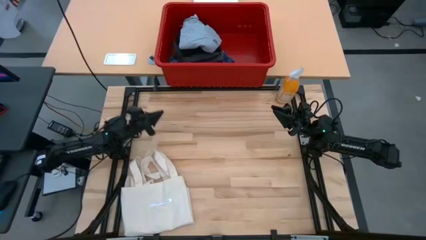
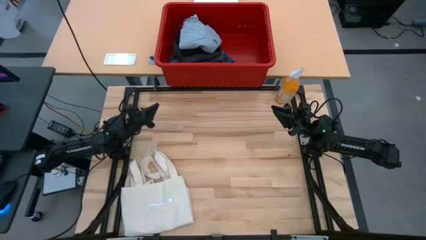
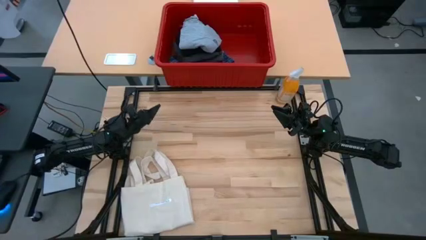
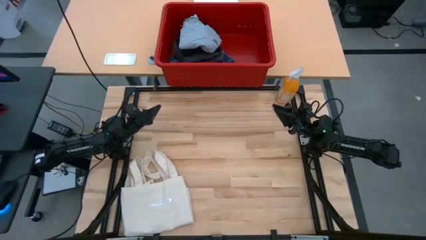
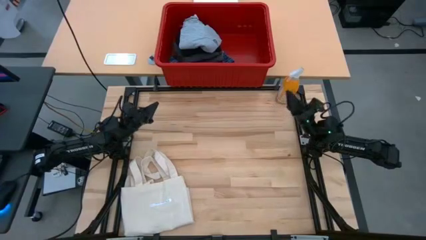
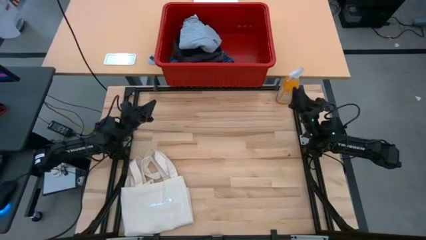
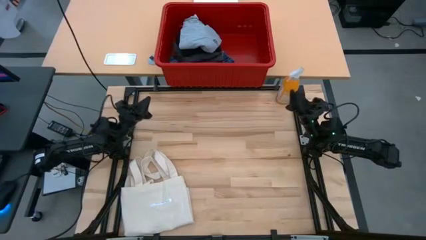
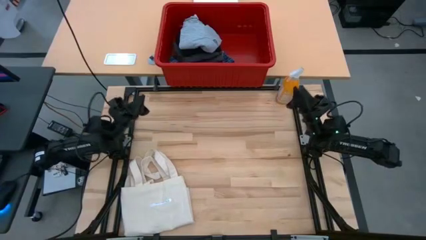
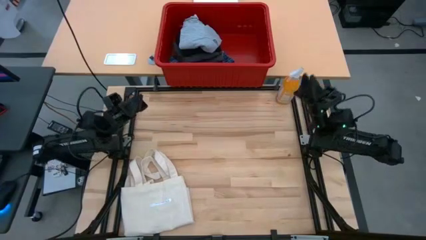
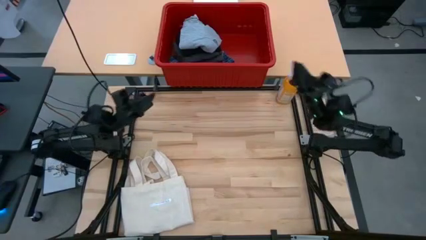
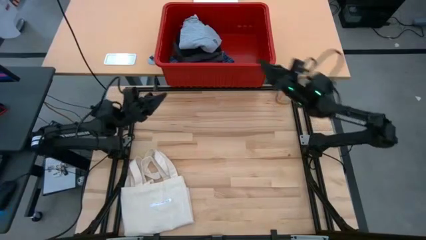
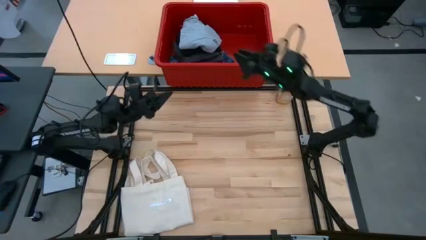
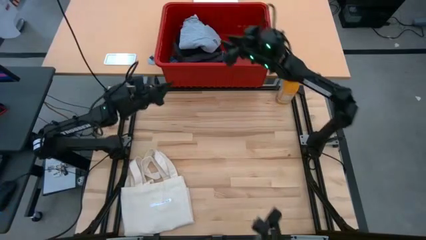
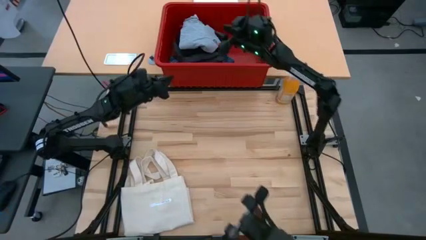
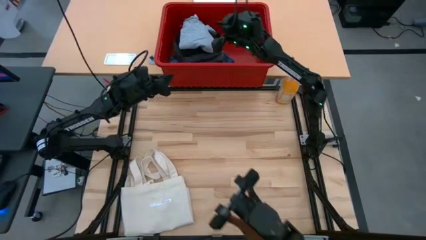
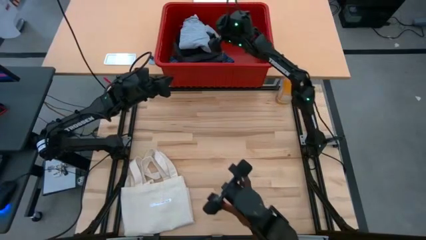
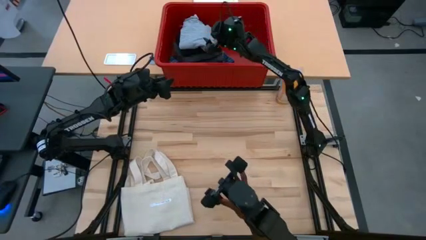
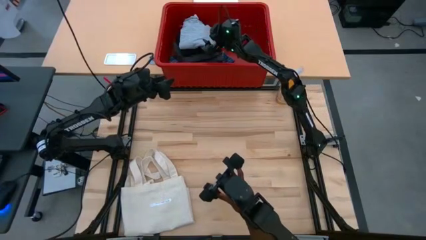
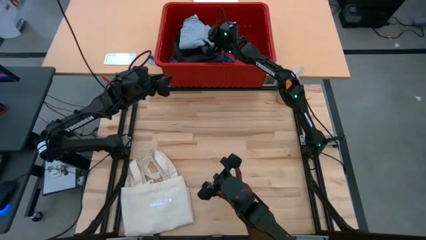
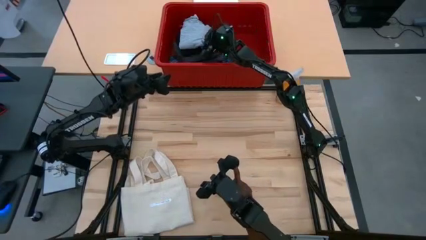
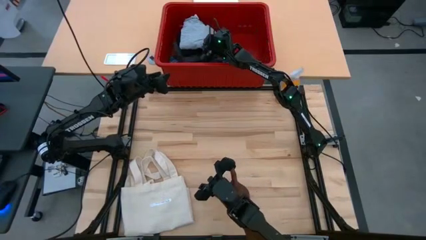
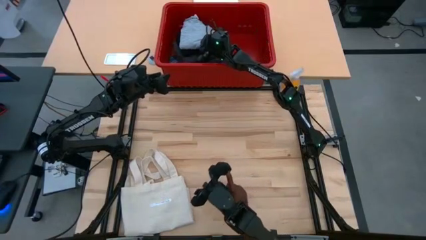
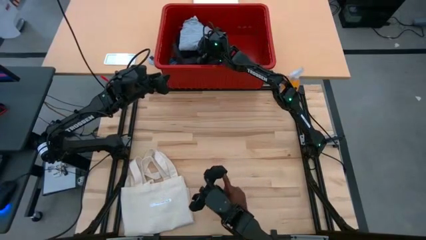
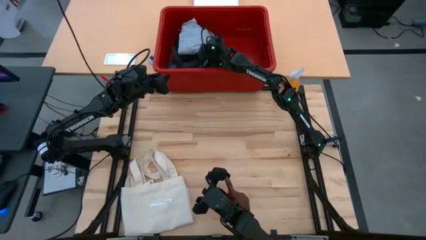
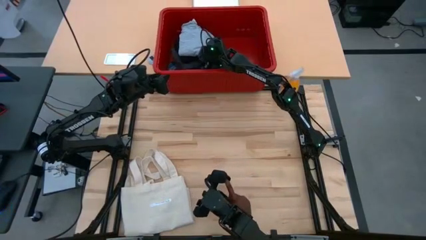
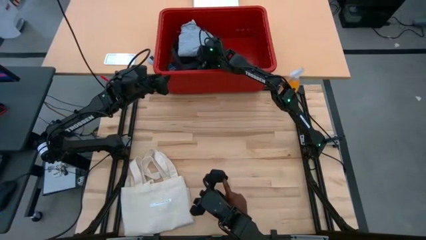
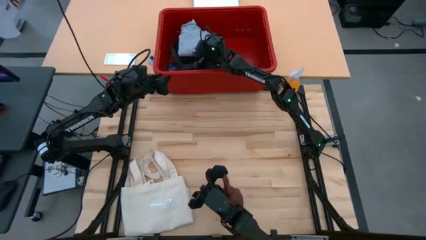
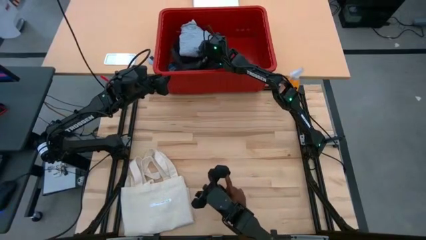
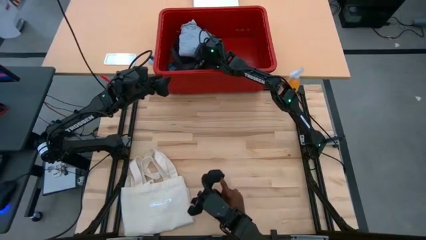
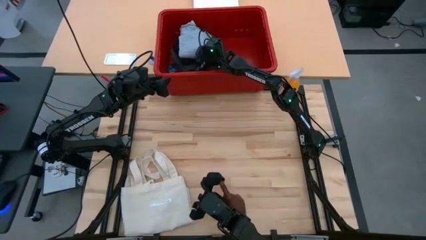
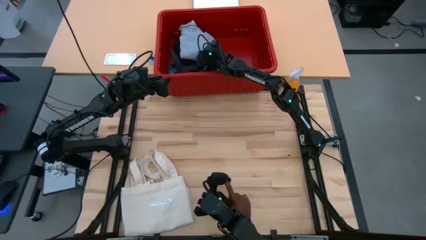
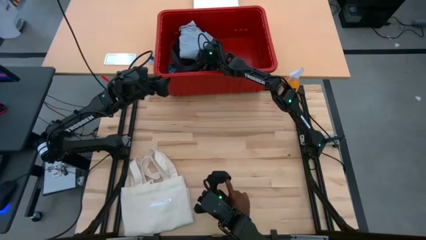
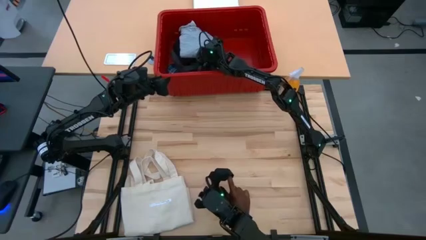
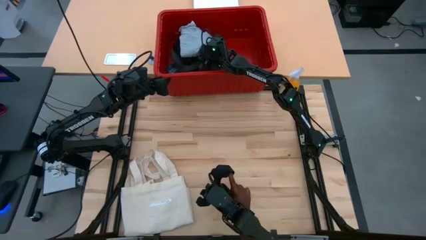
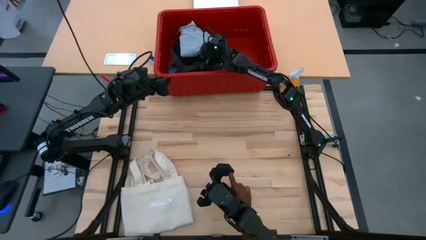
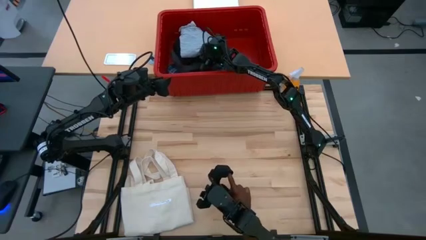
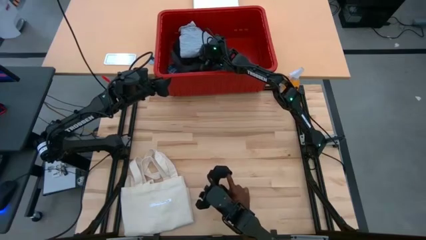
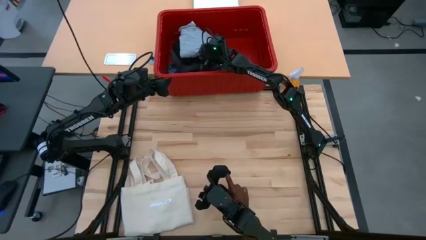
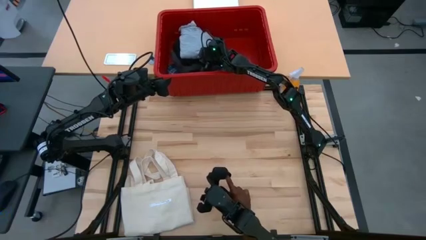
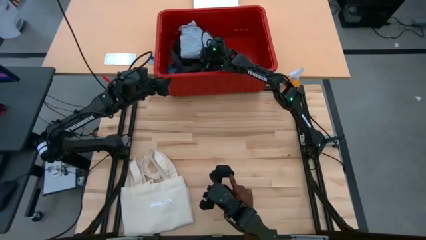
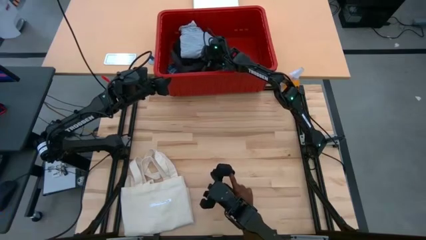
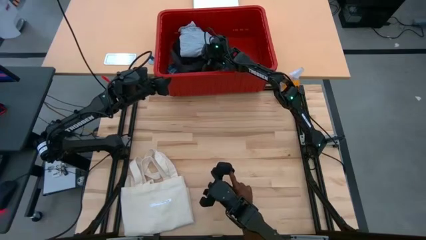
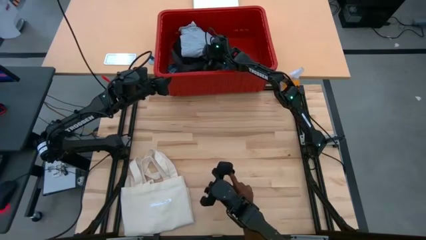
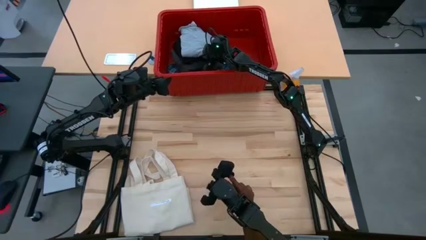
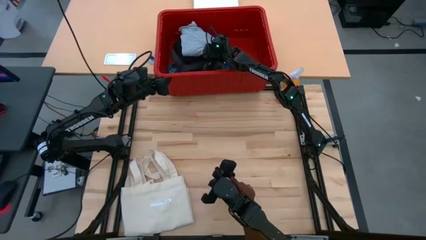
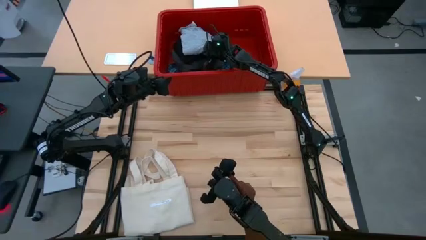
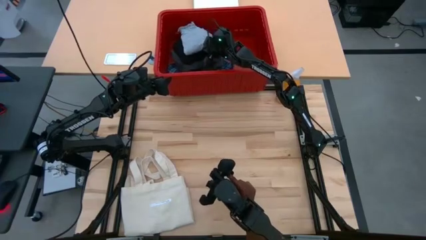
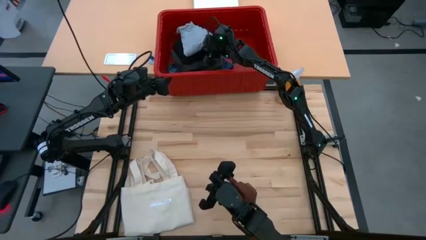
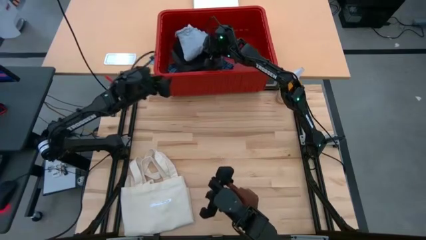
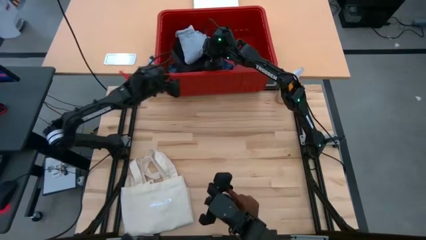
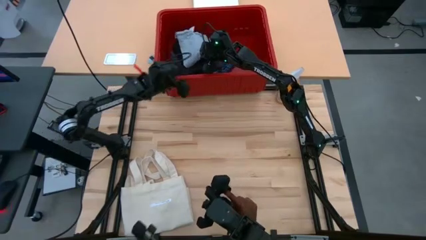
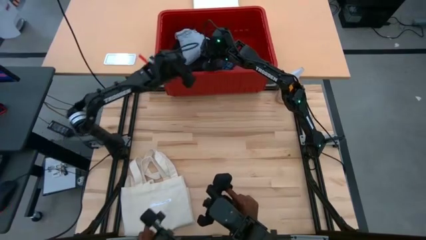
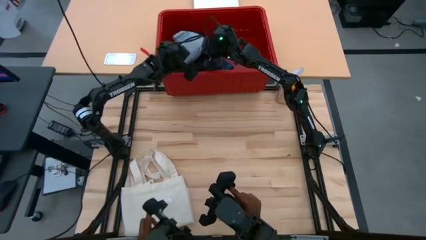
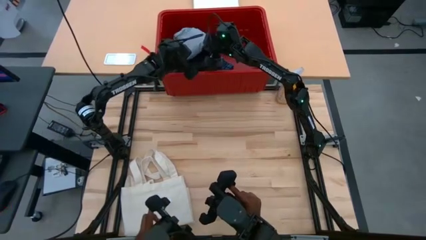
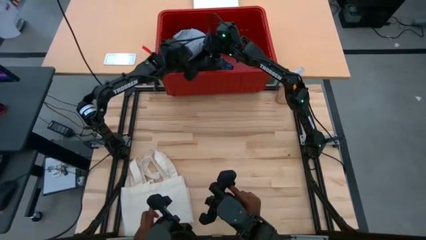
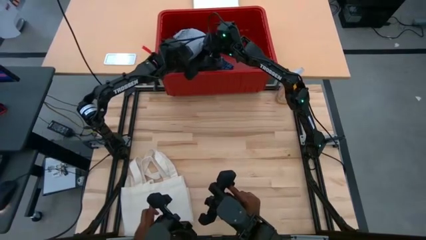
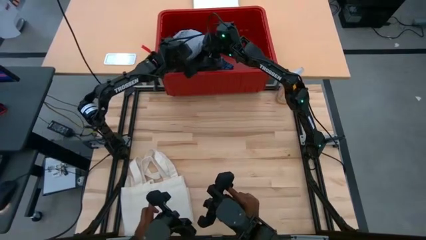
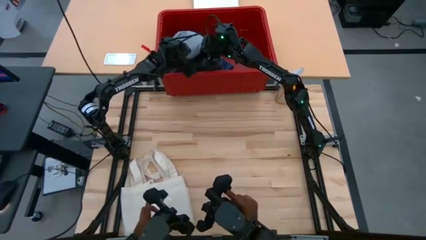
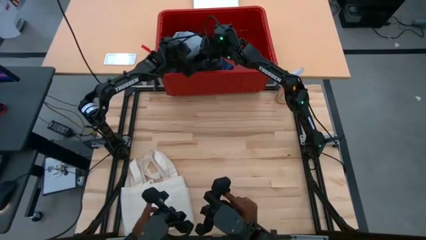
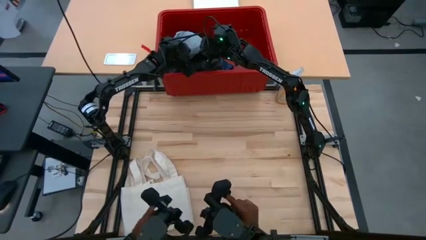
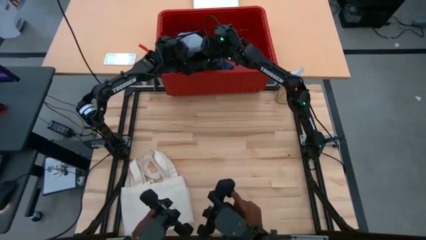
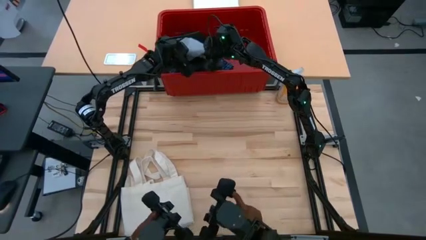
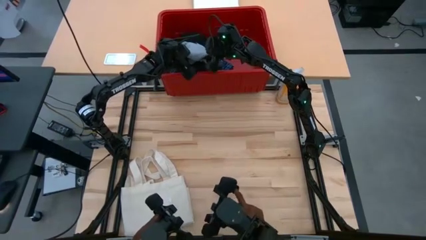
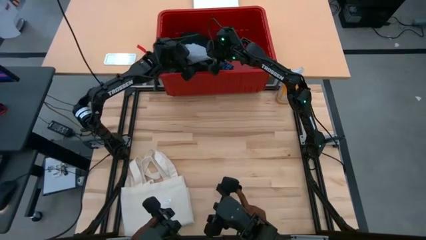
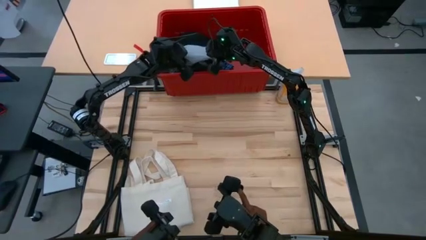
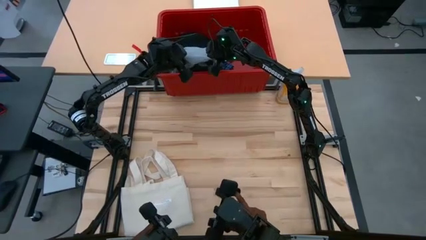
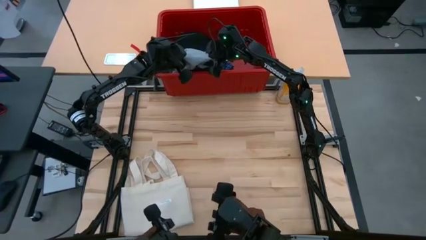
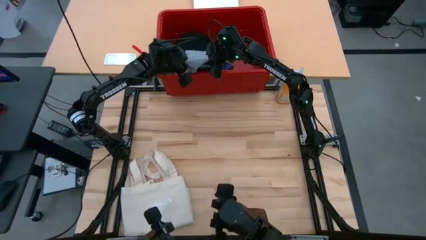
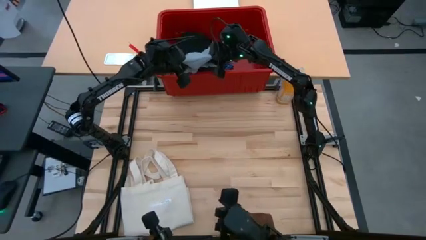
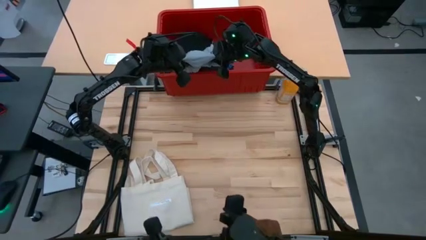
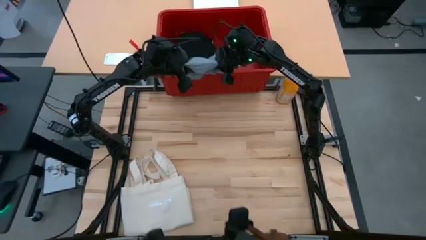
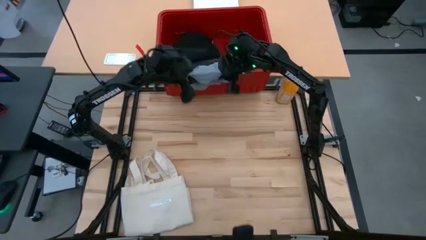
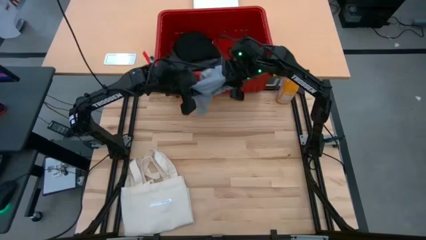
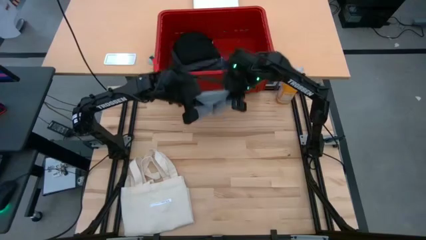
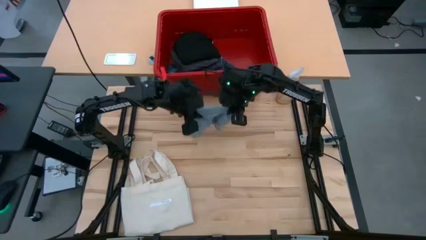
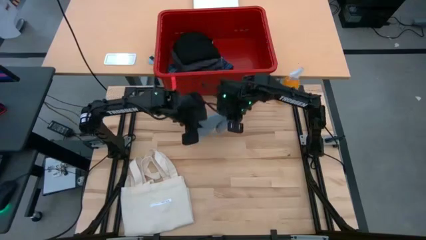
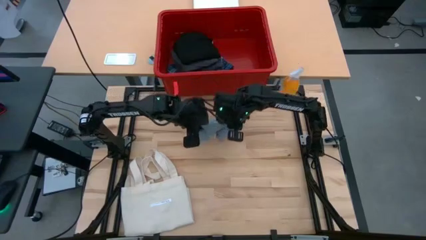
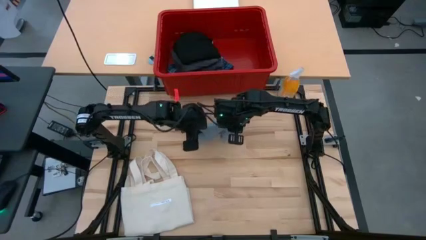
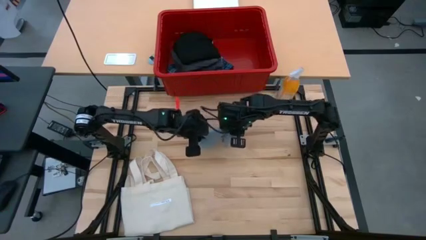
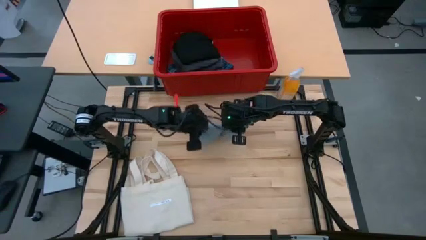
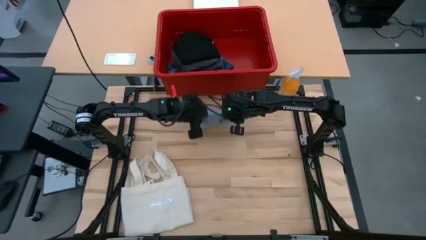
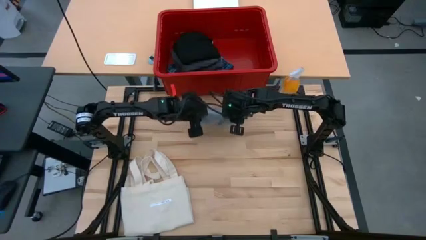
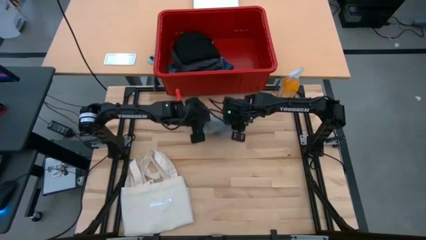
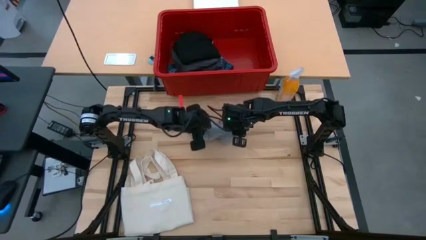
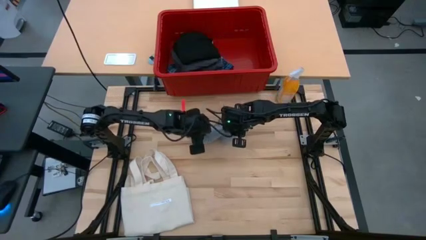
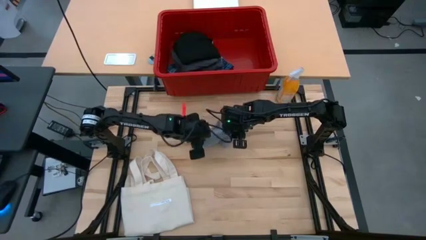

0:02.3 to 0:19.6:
Task: Fold laundry
Remove the gray t-shirt from the red organizer bin
